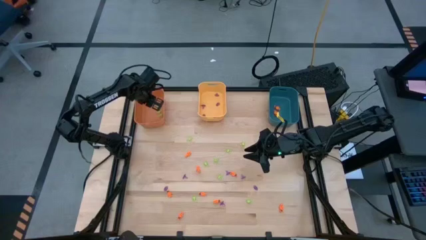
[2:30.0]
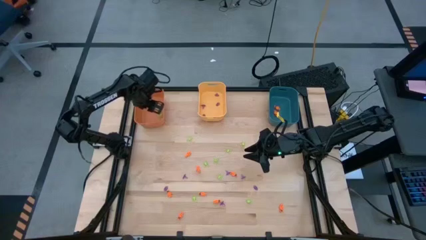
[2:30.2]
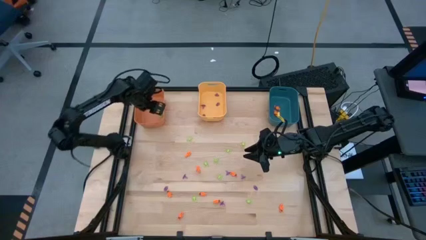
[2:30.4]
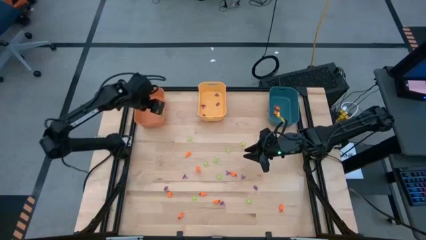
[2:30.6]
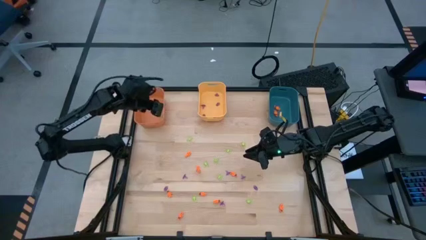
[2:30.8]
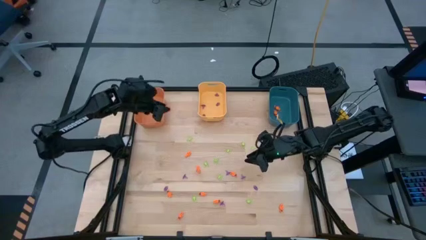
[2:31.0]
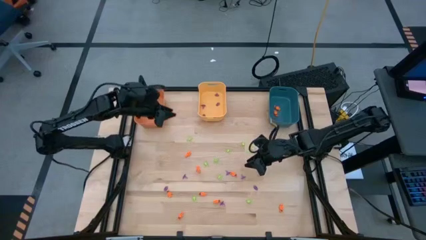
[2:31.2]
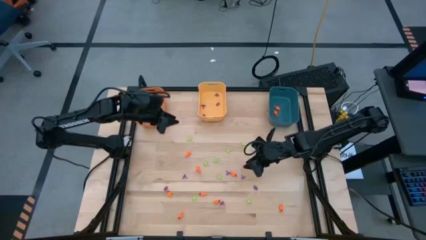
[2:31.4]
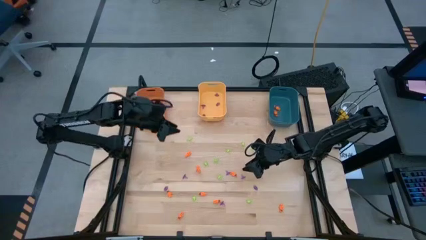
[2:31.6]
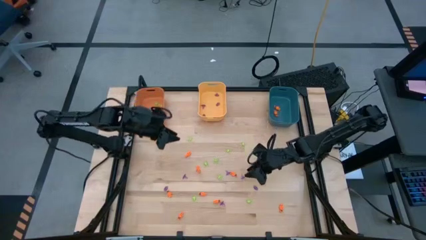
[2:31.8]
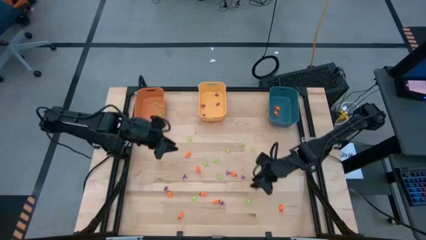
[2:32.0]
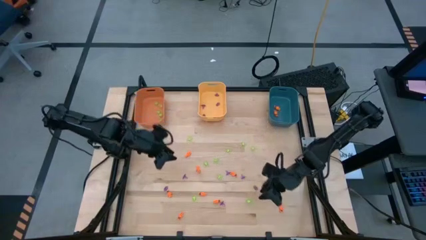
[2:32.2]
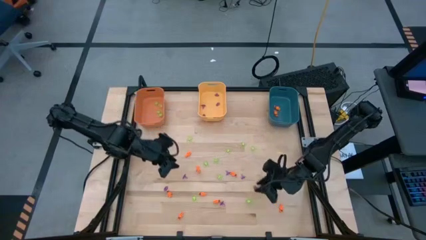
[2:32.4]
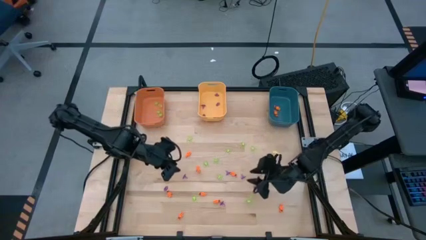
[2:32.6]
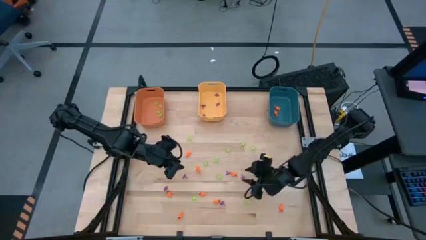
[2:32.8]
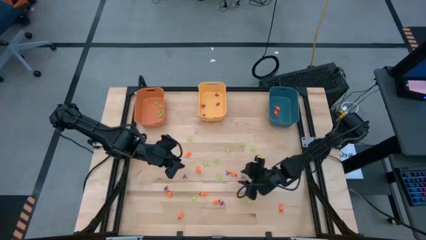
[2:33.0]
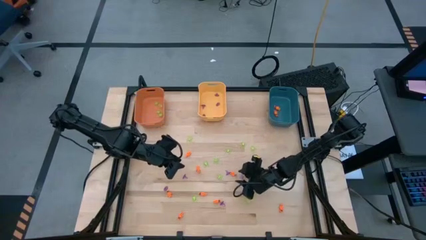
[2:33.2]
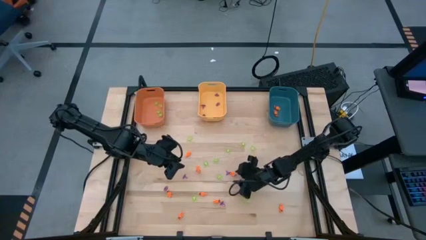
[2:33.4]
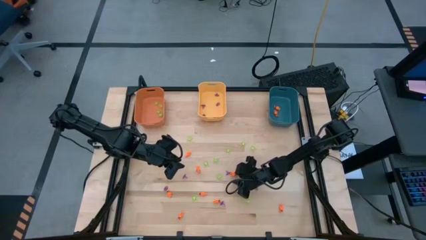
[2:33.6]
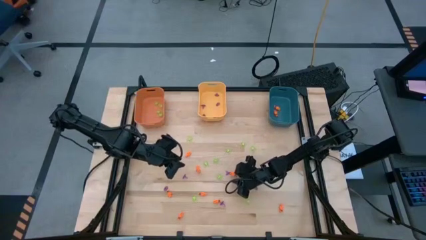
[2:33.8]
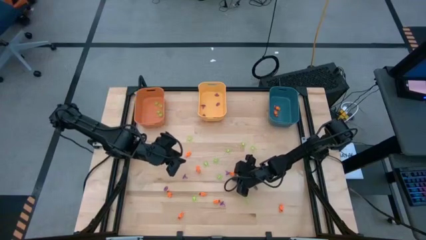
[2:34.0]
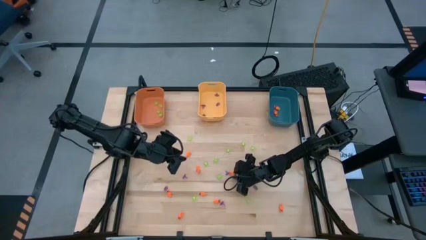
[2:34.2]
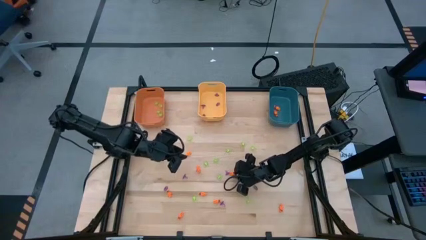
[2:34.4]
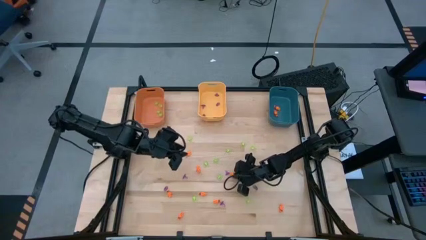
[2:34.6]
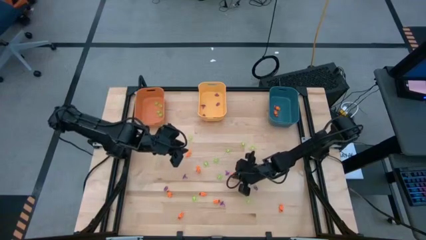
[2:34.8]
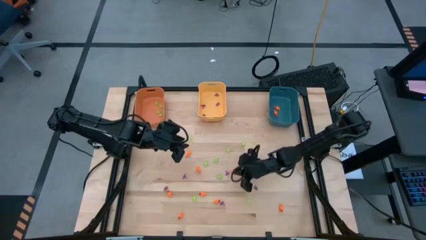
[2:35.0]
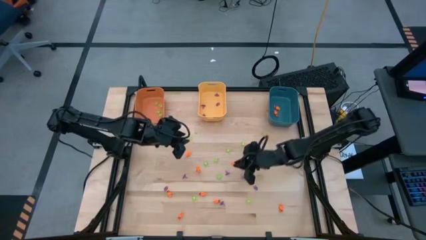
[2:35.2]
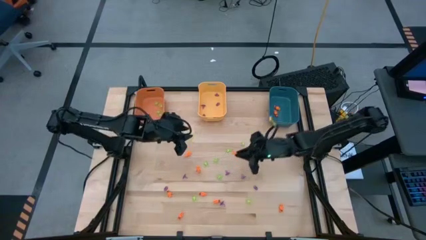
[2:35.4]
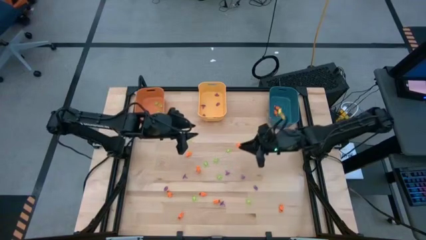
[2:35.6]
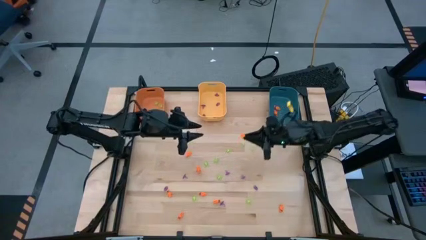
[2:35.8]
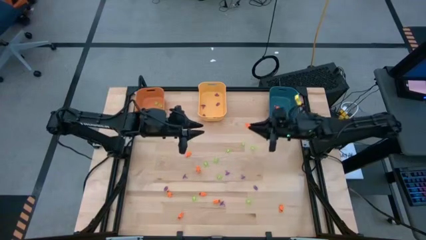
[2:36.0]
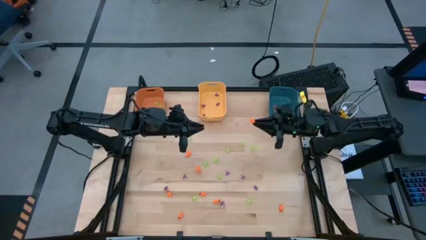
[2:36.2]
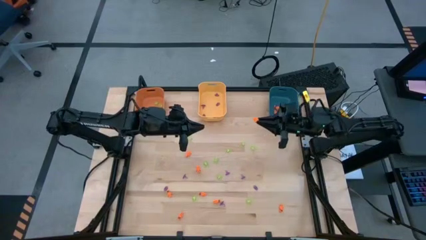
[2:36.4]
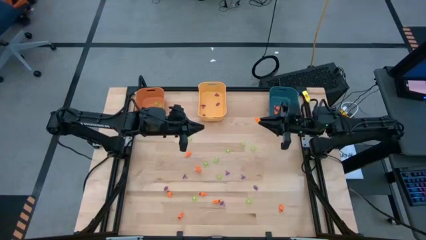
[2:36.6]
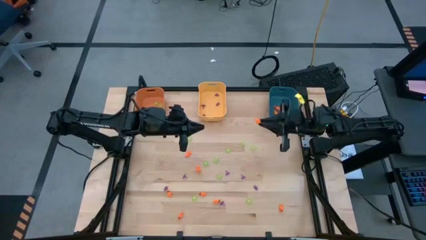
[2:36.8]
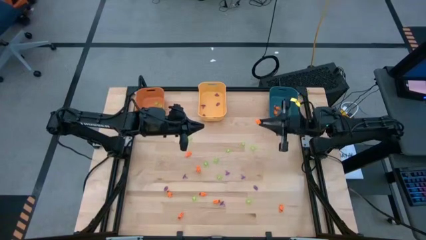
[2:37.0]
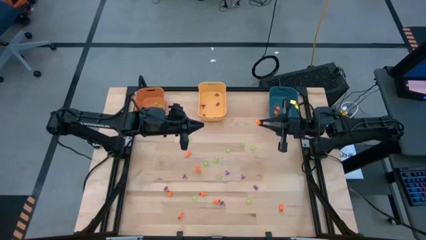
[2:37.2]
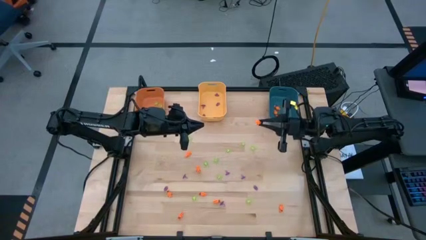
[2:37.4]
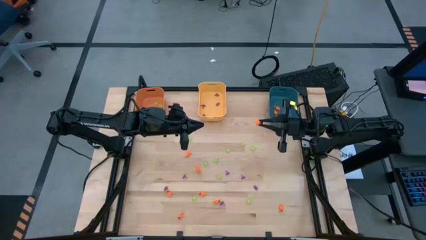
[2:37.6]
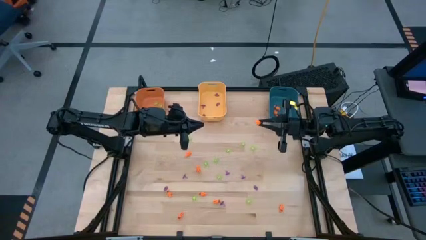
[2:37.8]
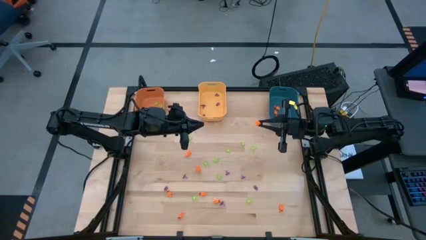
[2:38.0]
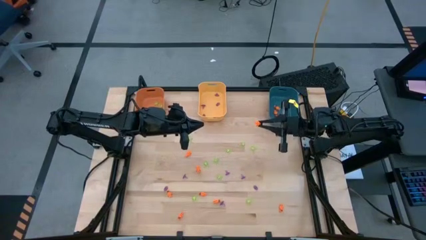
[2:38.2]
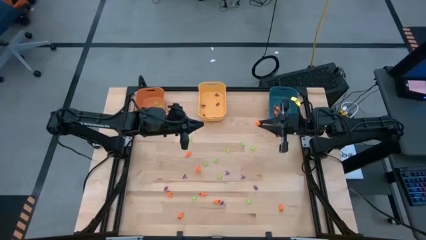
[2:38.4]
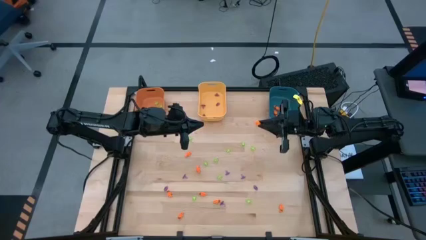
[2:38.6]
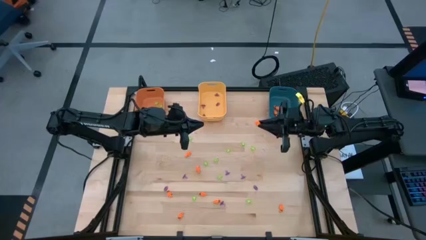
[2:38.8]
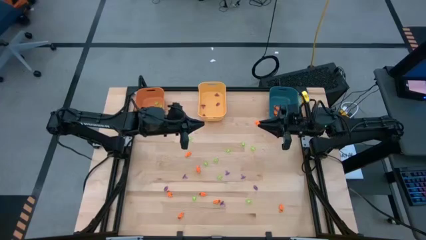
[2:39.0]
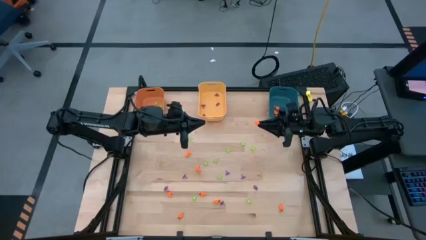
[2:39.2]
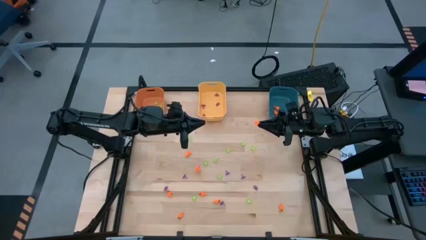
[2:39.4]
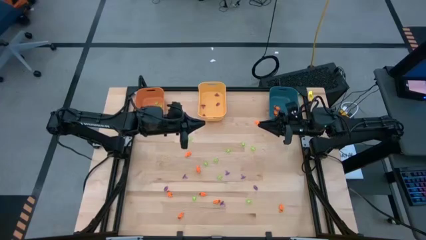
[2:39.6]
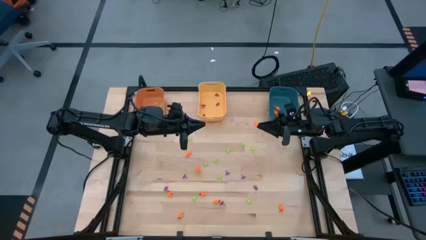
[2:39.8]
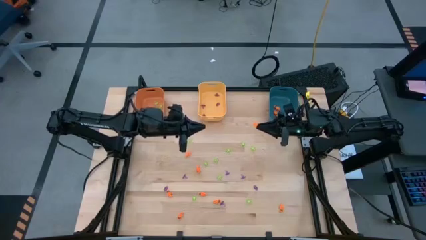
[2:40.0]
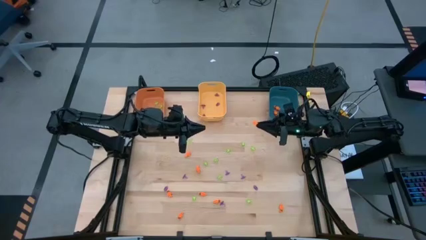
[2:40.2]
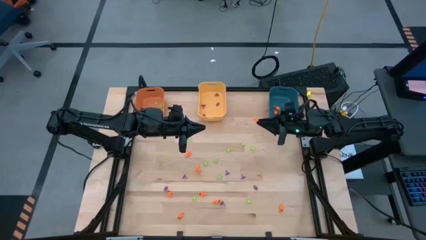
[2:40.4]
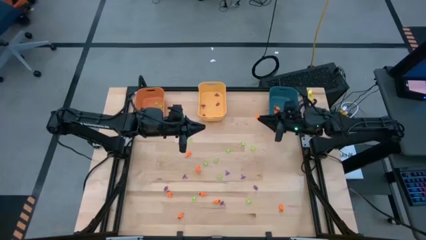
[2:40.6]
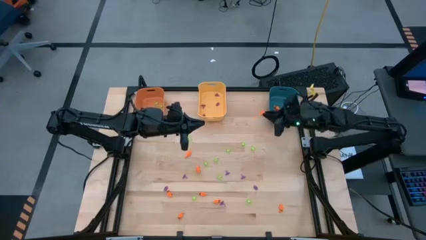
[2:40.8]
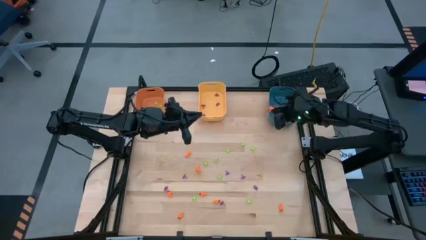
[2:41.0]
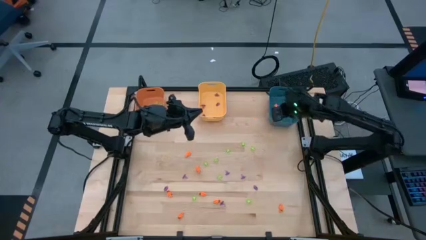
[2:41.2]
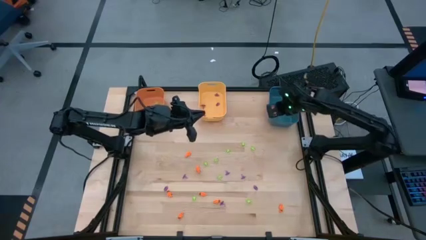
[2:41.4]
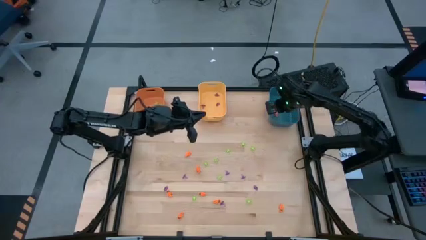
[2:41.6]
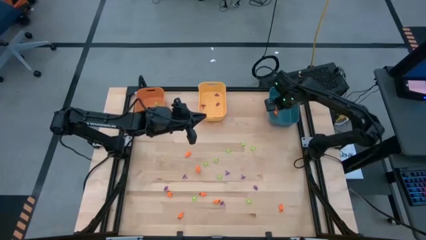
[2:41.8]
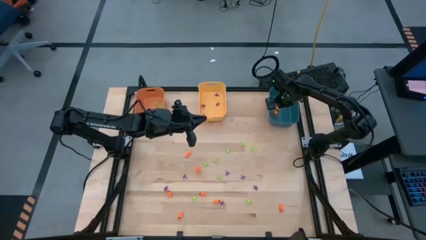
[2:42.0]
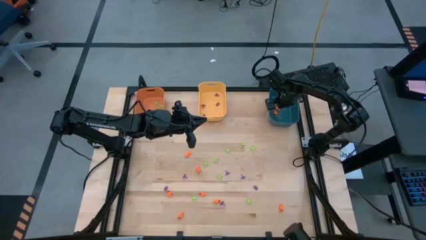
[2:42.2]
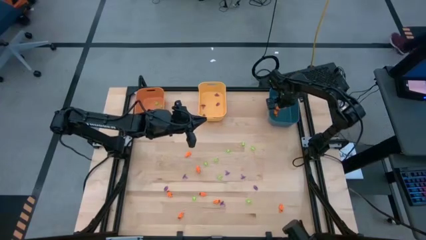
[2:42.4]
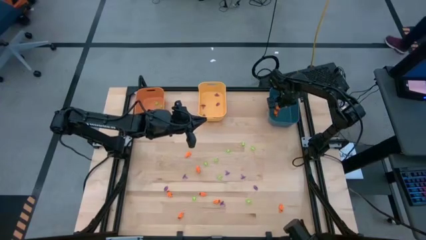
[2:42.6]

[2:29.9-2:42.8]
Task: Sort Halloween decoration
Put the orange skeleton toy into the blue bin

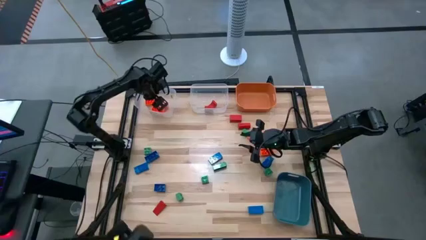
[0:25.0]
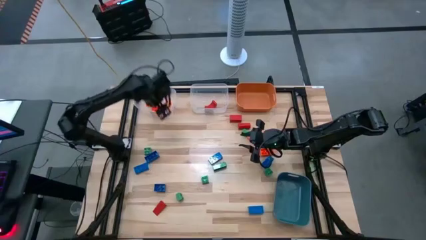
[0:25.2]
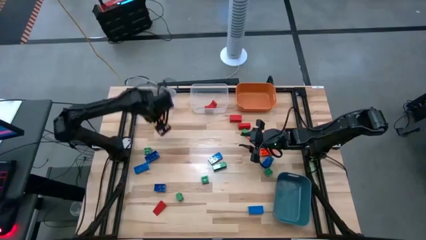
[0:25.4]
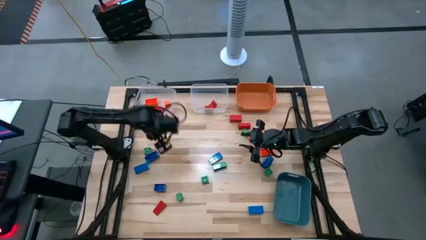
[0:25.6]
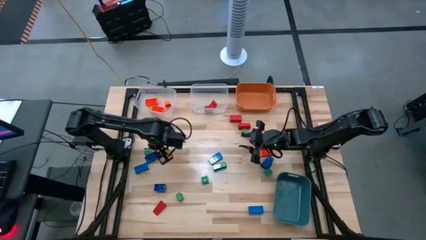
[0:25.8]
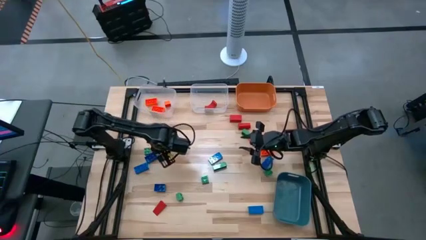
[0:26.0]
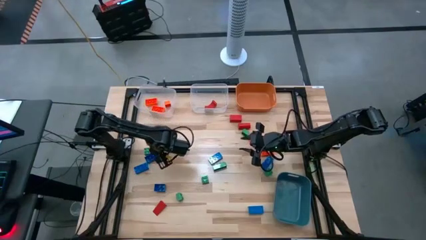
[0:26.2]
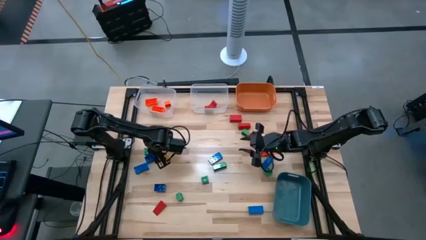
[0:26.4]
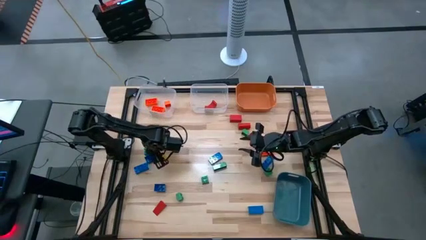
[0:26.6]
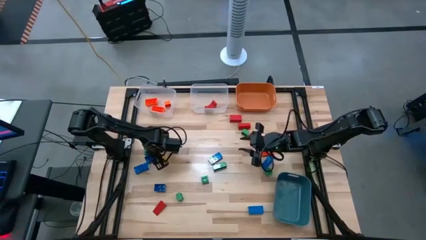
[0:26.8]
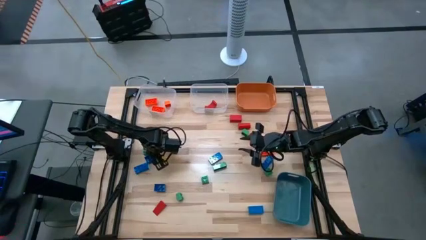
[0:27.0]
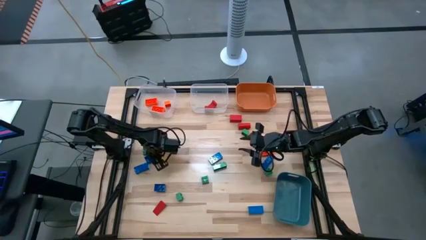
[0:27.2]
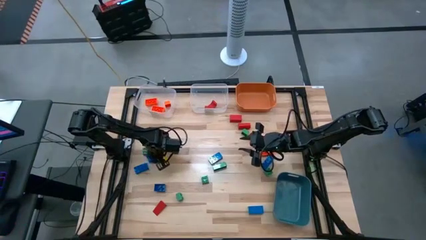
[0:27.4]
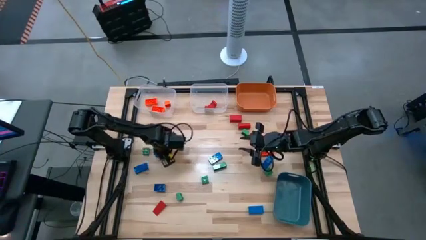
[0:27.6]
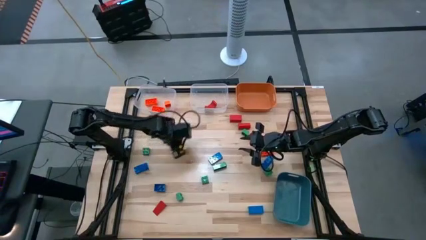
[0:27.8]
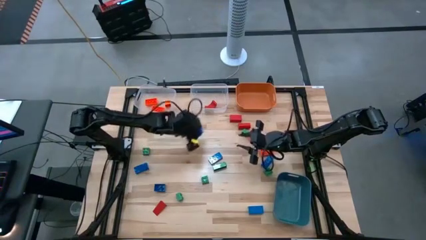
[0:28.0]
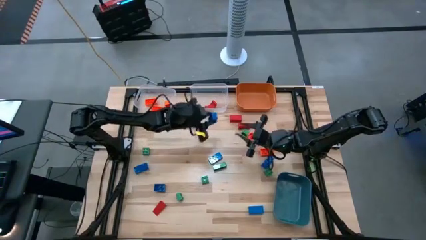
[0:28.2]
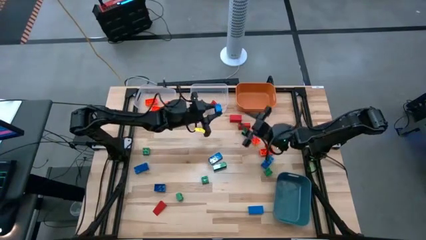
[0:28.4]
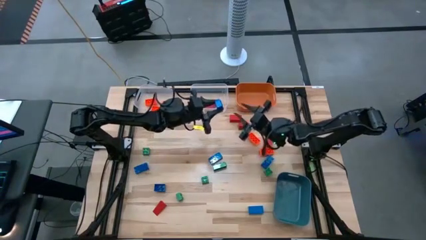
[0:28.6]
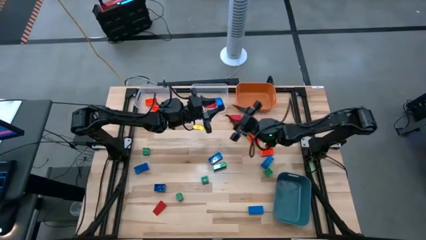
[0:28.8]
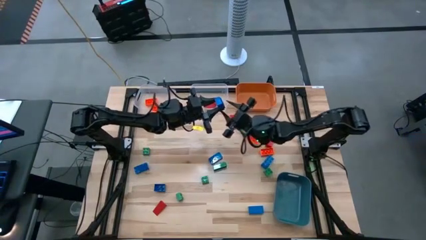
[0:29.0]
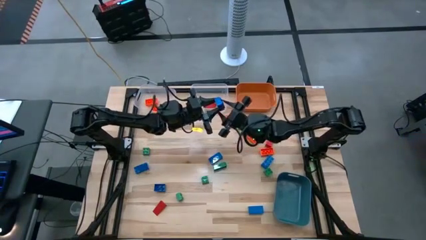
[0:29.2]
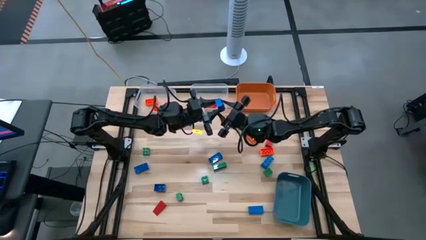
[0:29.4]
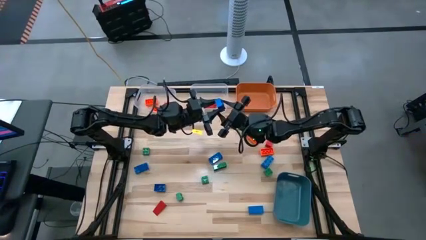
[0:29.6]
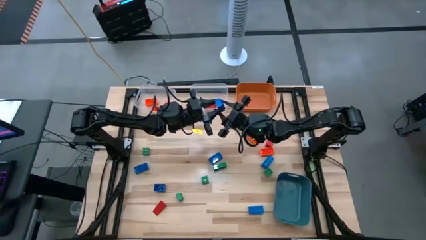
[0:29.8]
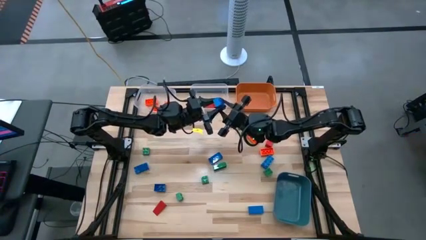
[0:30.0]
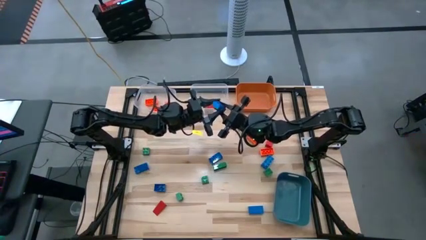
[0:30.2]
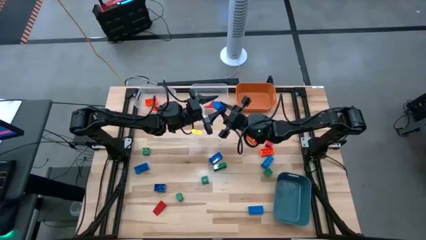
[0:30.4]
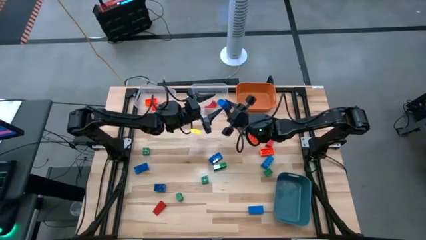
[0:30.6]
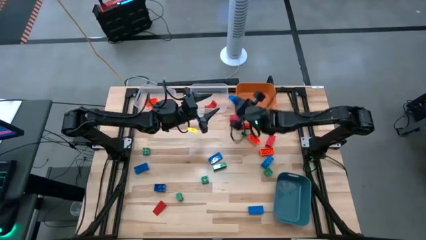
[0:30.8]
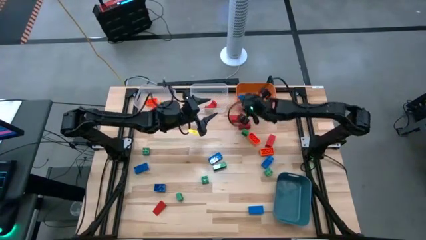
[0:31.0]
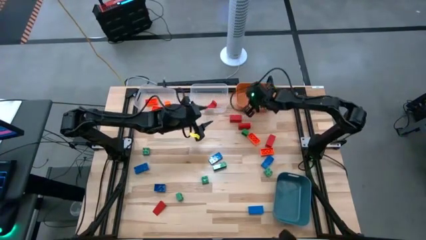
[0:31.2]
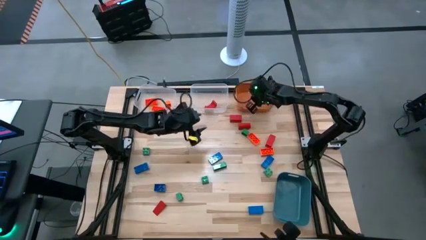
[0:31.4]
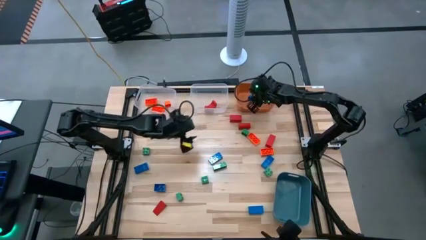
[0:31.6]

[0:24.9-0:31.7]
Task: Sort blocks
Put the blue game piece into the orange bin
